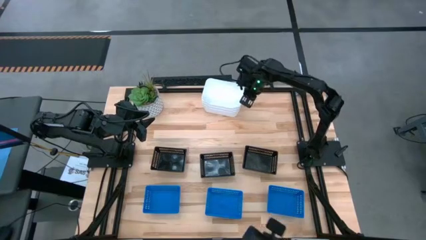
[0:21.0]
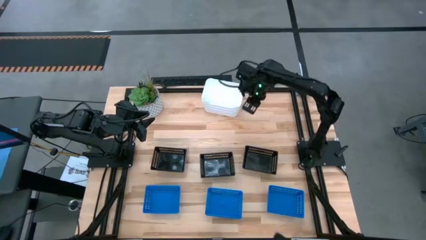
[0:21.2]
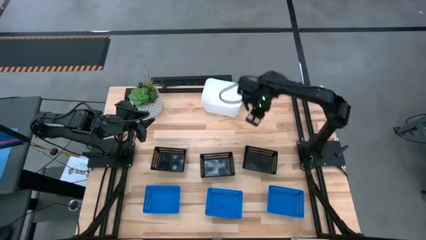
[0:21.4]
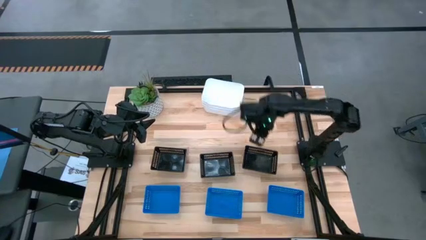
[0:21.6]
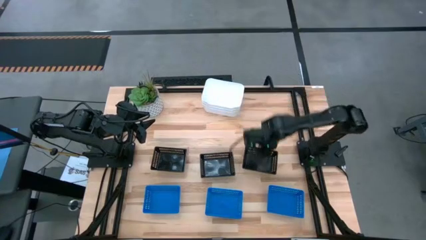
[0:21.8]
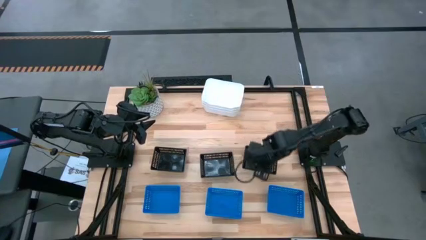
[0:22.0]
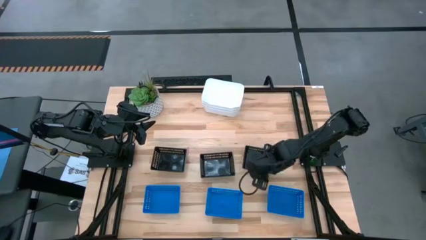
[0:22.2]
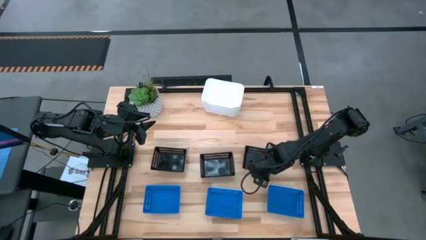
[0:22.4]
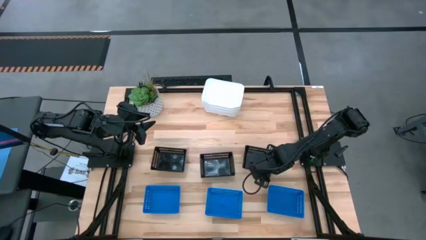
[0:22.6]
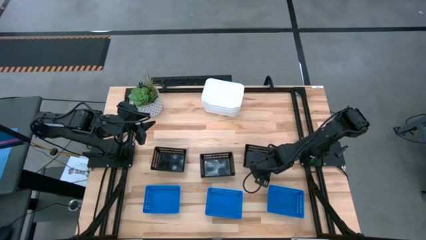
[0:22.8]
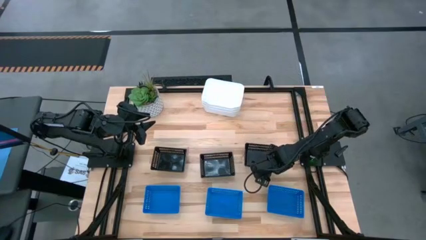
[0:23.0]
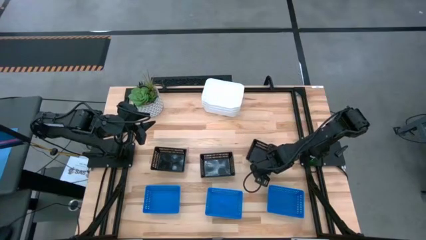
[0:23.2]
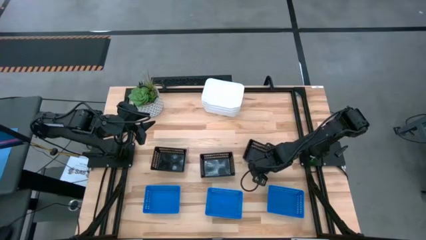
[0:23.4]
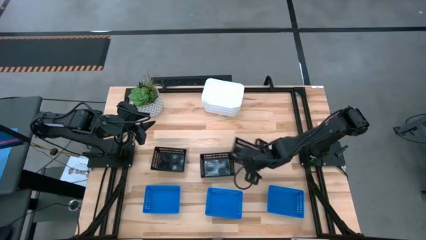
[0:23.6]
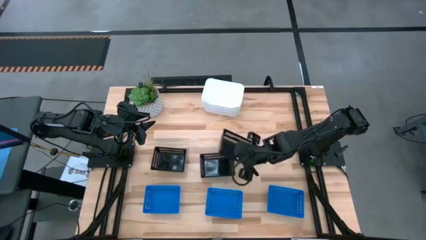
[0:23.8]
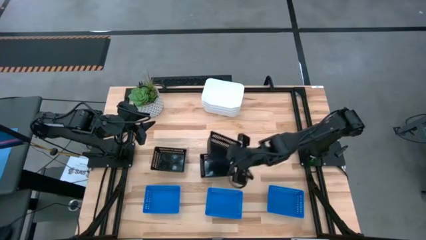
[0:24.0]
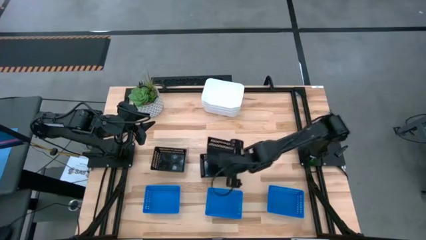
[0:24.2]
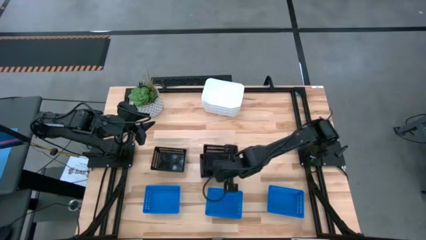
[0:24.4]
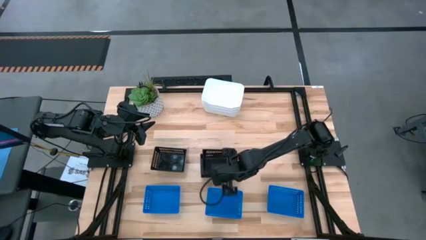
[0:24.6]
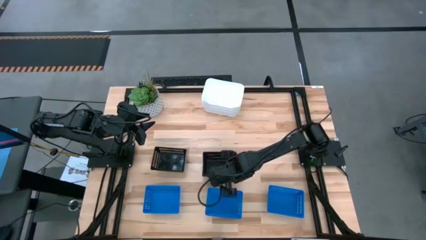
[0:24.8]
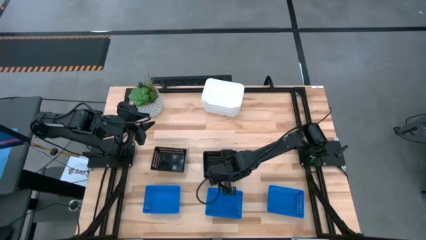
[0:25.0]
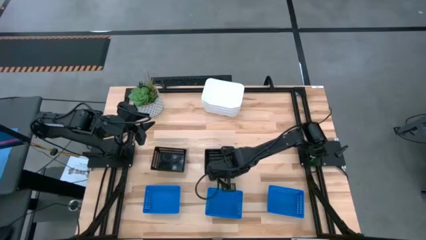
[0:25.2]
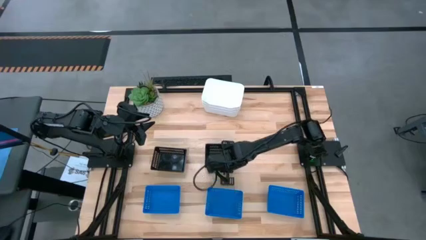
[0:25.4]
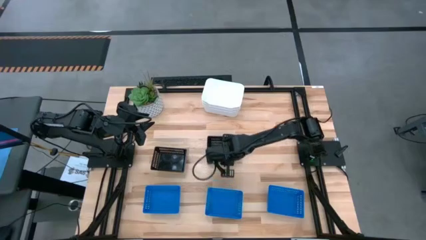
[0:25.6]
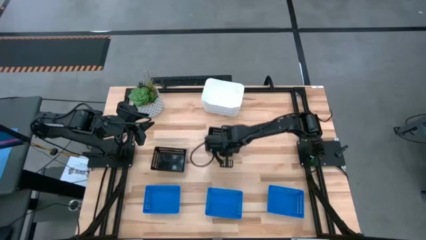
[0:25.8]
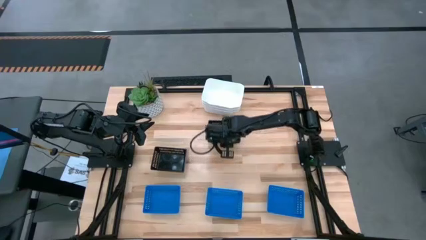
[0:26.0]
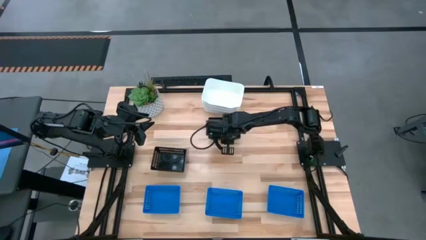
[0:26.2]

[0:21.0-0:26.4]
Stack the right black bin on the middle black bin

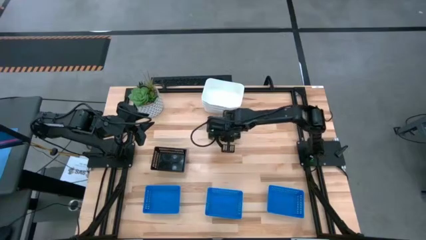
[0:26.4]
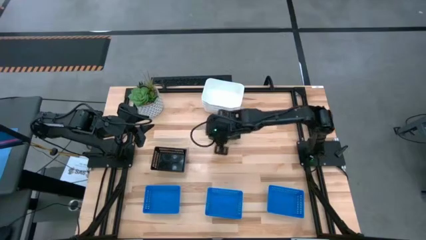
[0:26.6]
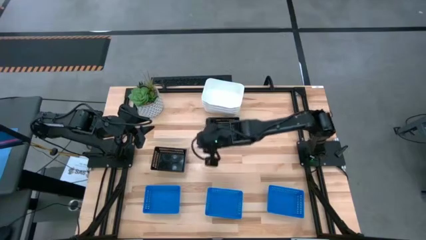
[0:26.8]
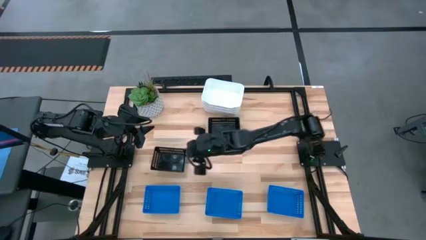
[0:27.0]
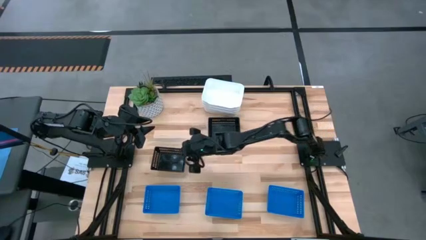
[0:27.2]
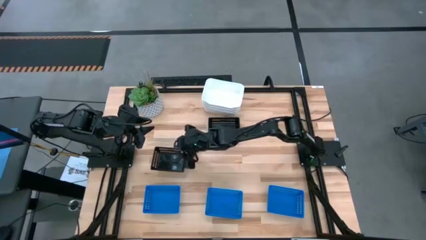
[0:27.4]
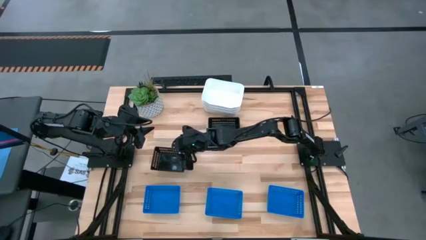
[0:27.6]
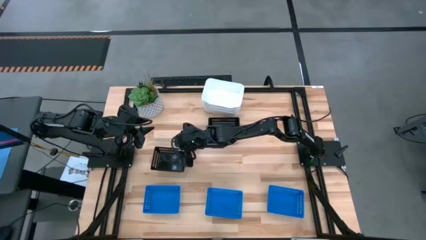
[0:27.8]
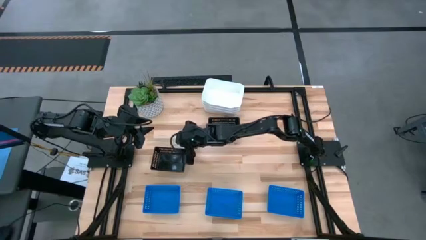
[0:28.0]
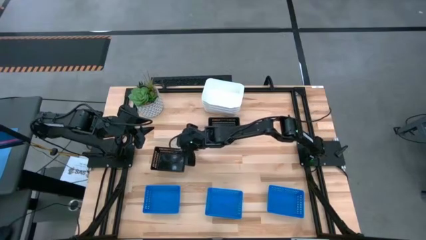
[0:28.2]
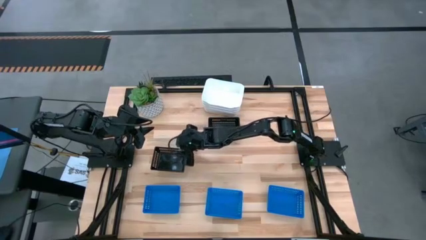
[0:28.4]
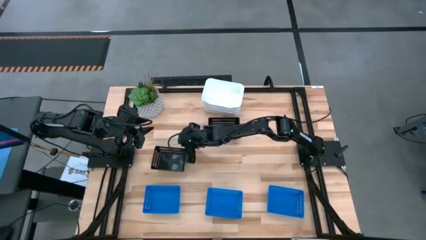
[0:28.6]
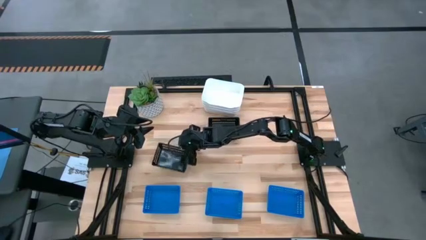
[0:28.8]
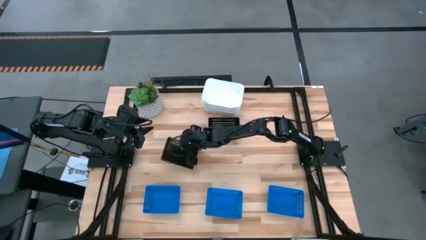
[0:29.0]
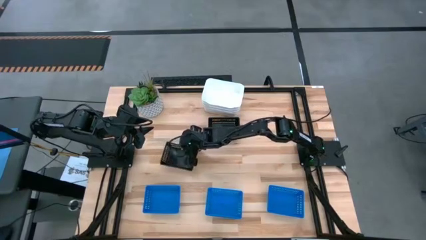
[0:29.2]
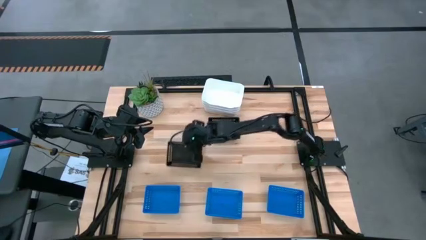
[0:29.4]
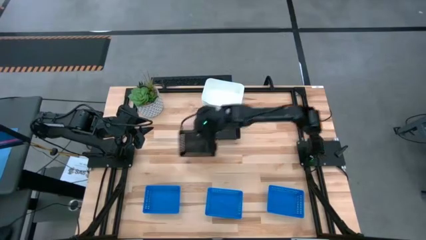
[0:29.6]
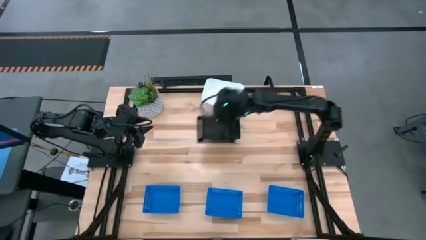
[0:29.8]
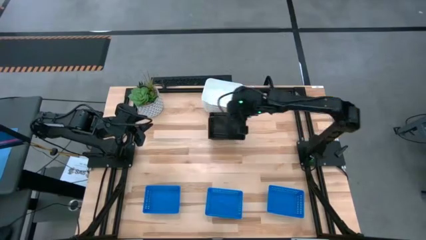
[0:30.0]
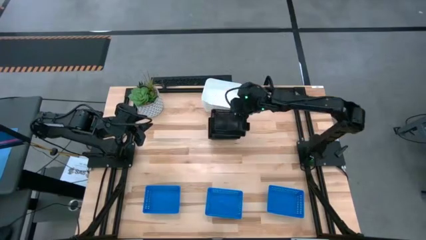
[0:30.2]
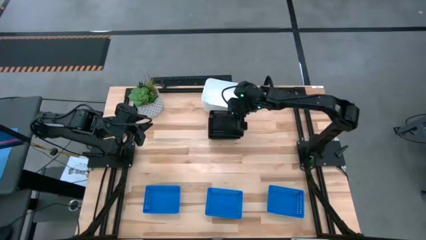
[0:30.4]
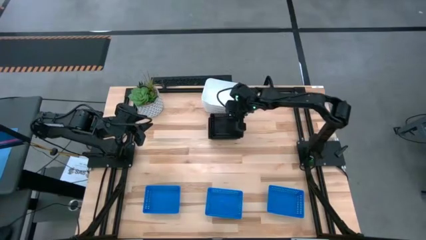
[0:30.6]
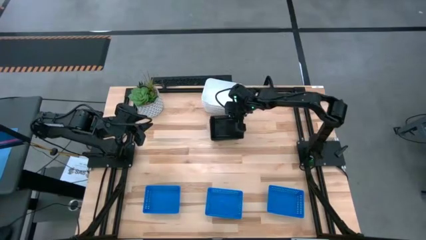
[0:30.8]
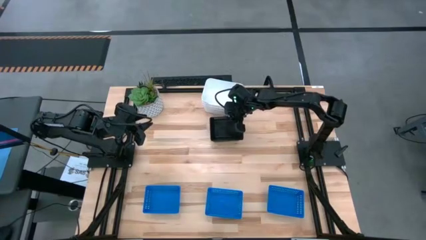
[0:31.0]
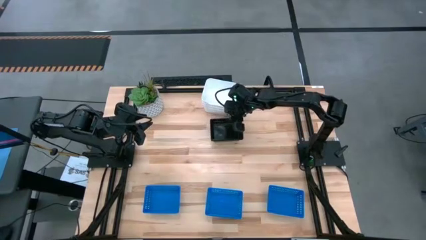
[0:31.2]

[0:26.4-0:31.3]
Stack the left black bin on the right black bin

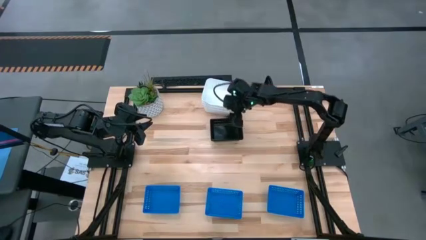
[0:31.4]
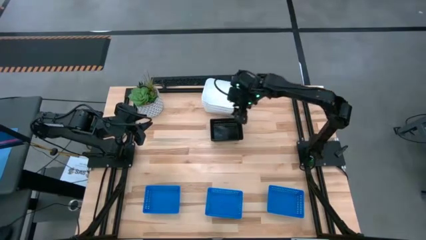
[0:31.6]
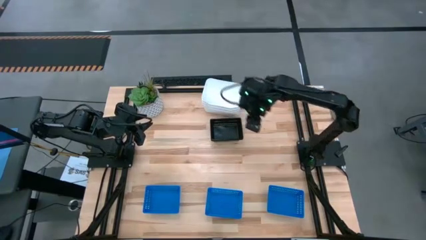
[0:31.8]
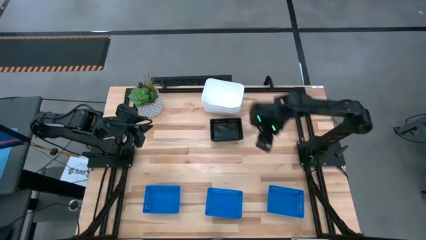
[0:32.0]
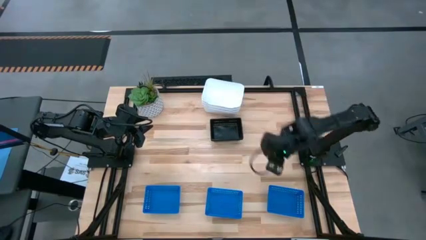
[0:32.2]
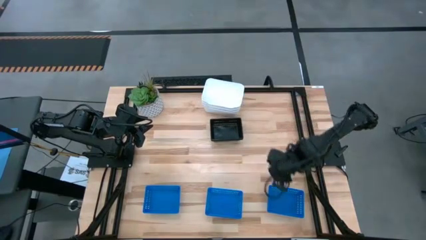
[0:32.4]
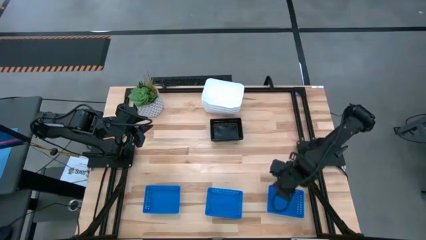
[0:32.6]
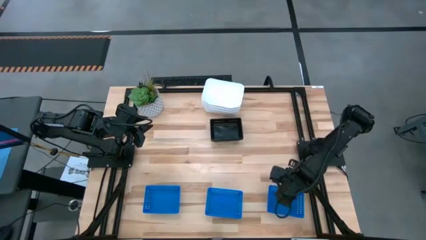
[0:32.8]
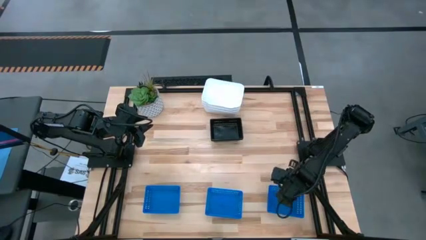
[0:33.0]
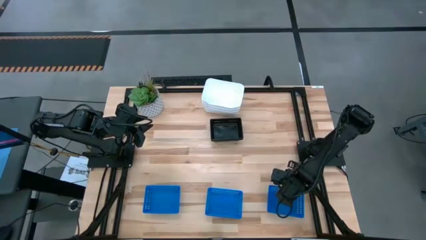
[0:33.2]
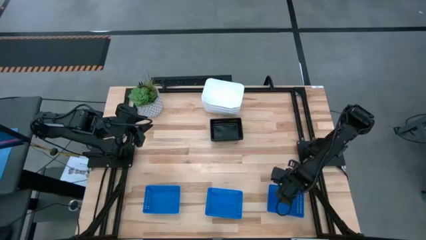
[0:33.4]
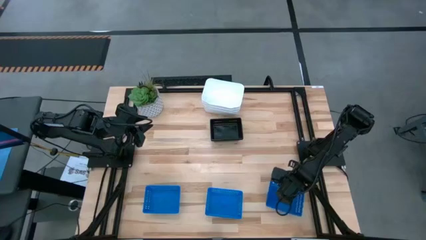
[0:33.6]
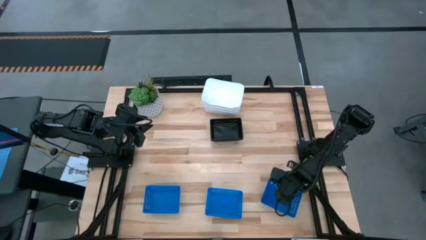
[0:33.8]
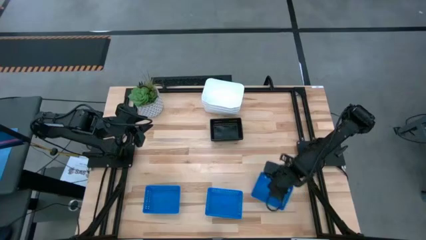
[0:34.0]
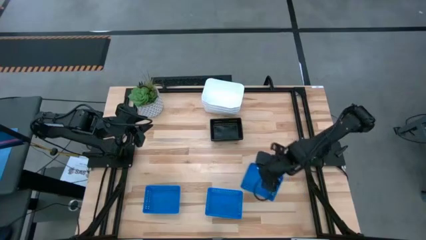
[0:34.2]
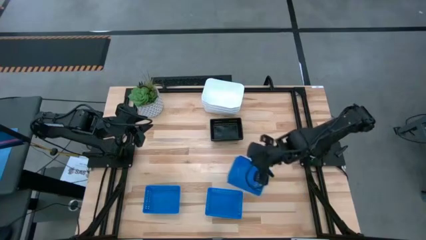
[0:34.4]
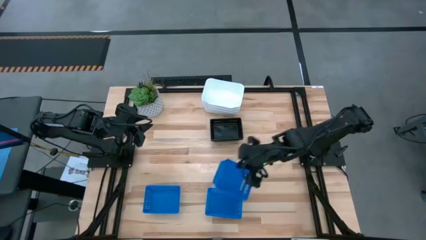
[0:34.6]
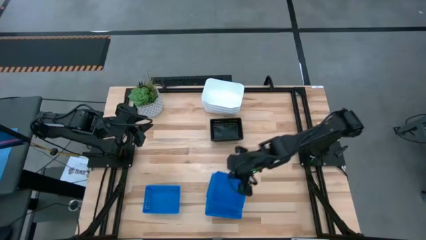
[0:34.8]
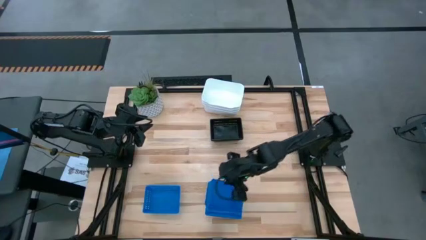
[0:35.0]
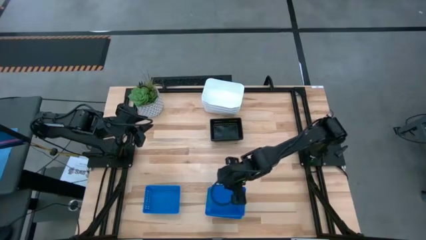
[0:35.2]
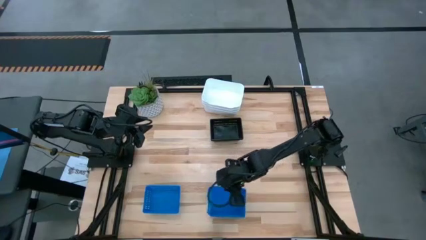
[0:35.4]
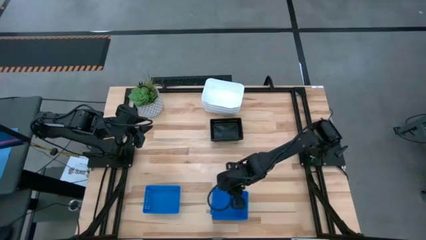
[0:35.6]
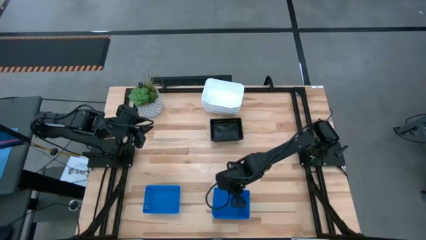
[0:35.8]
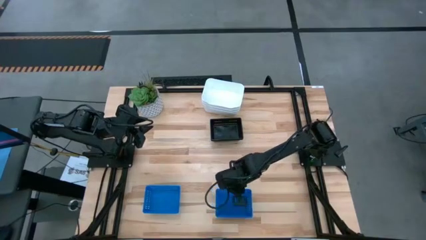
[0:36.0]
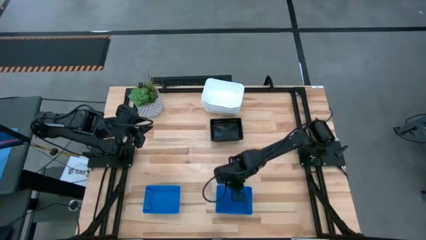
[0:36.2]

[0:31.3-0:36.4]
Stack the right blue bin on the middle blue bin

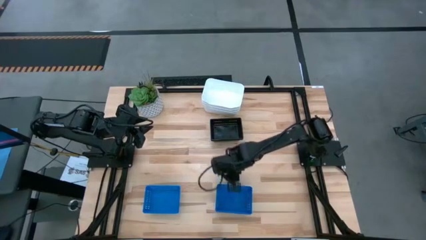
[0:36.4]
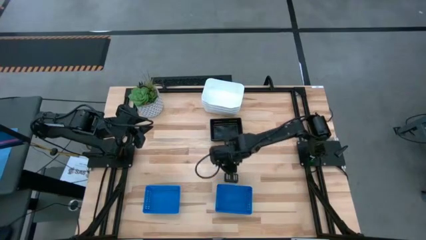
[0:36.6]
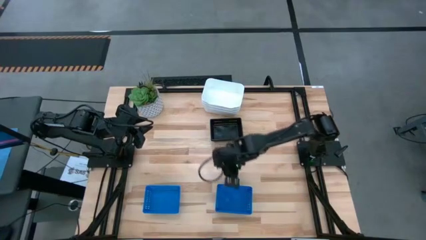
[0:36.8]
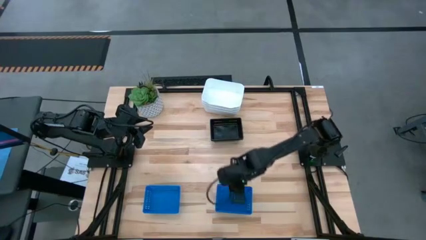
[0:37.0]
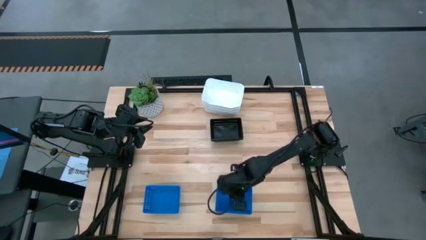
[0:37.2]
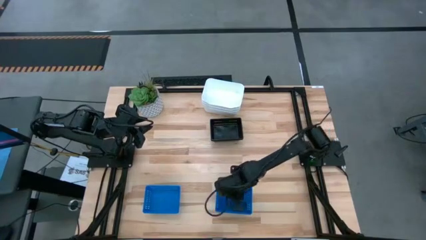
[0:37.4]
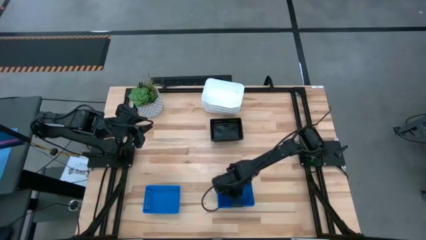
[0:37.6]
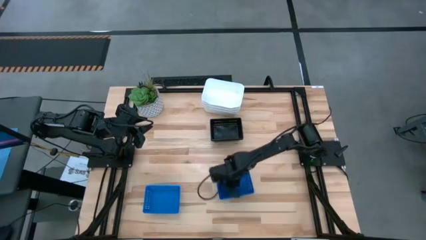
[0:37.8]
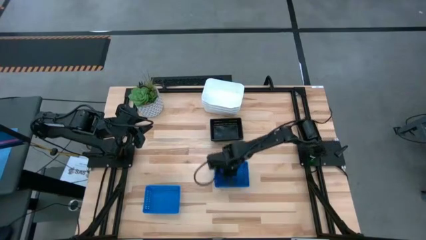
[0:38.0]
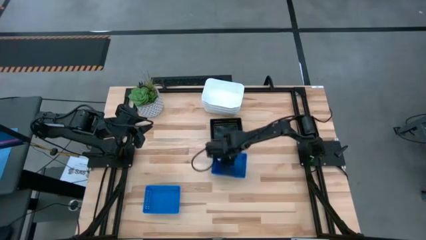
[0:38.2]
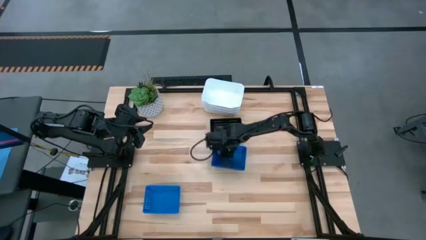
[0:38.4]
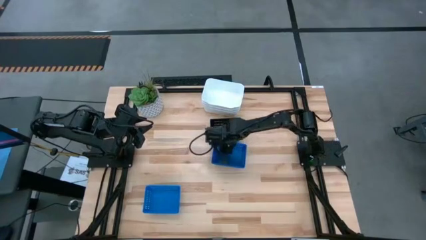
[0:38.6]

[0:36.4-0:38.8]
Move the stacked blue bins
